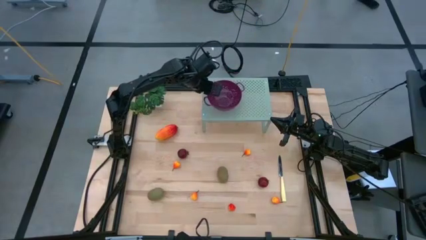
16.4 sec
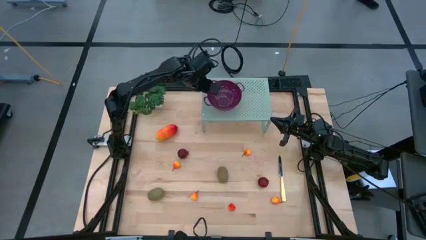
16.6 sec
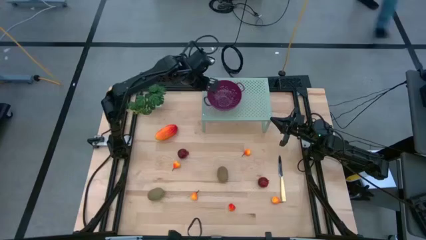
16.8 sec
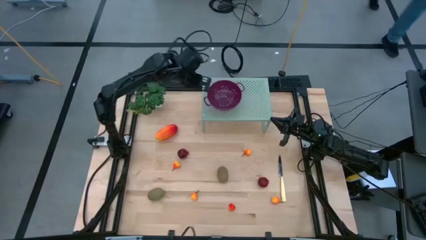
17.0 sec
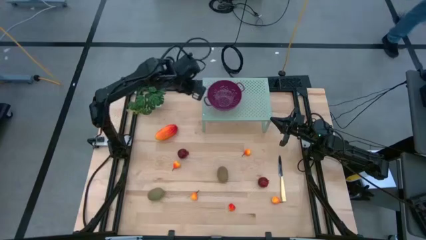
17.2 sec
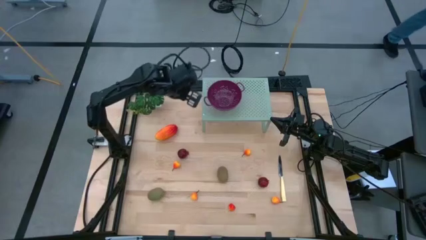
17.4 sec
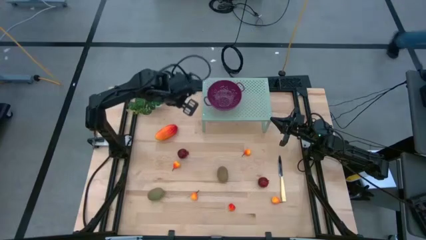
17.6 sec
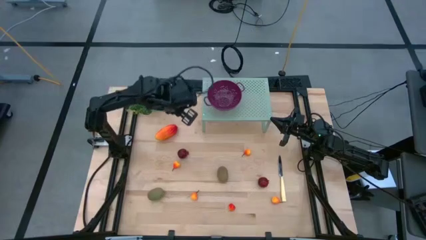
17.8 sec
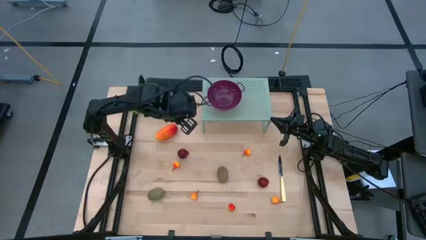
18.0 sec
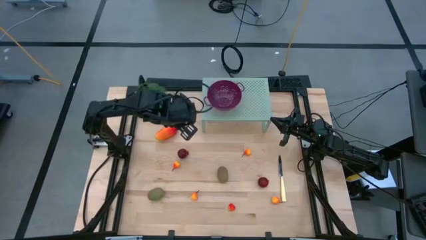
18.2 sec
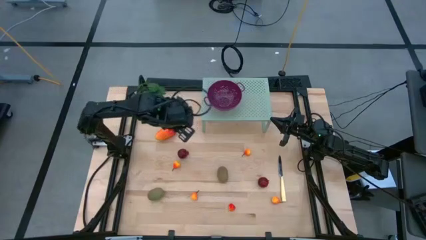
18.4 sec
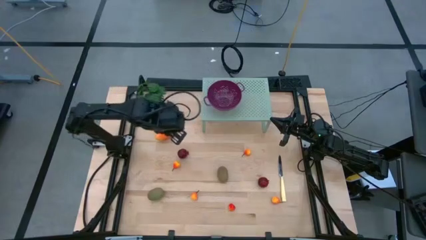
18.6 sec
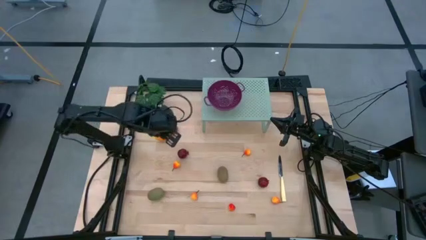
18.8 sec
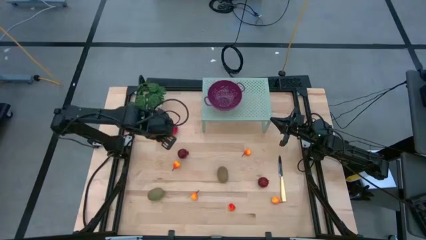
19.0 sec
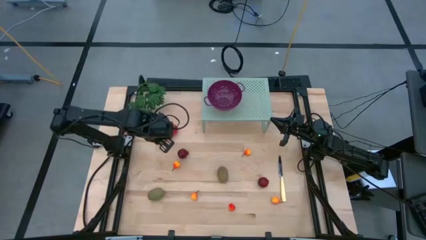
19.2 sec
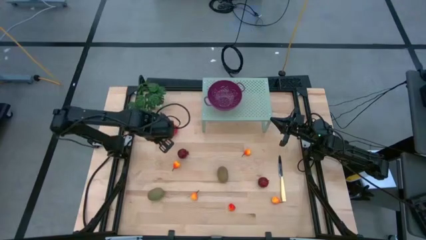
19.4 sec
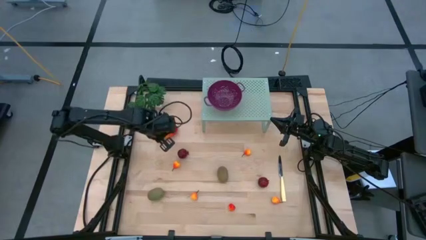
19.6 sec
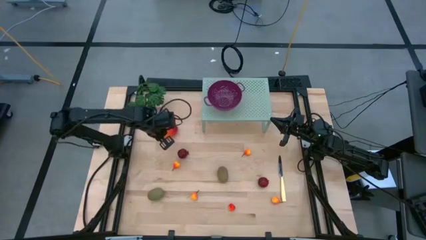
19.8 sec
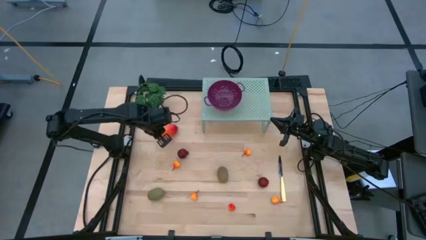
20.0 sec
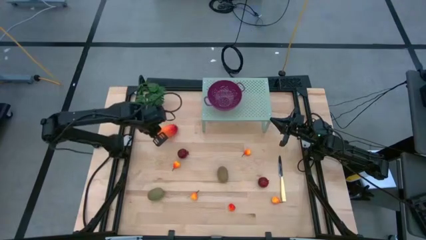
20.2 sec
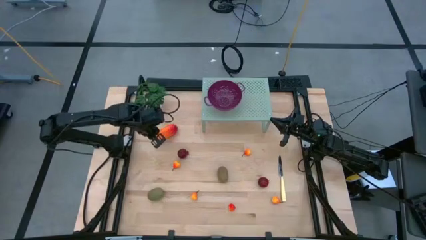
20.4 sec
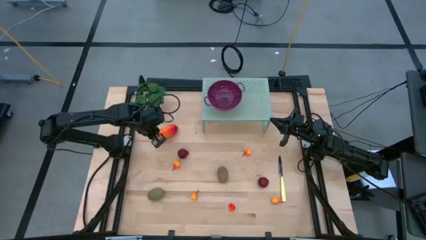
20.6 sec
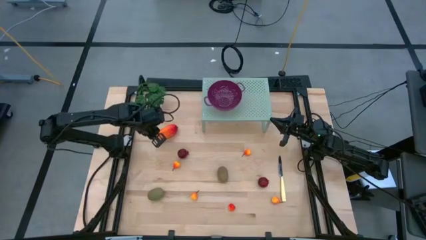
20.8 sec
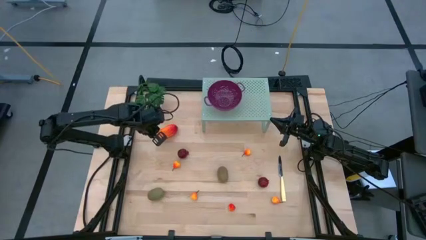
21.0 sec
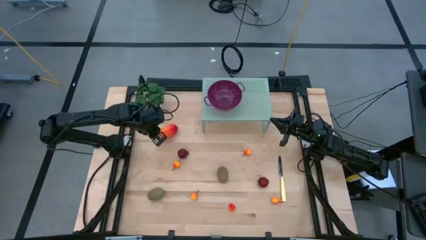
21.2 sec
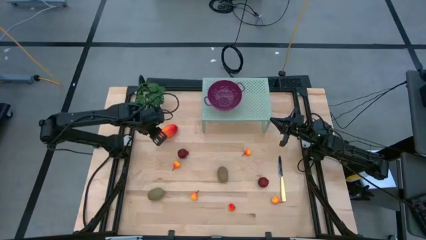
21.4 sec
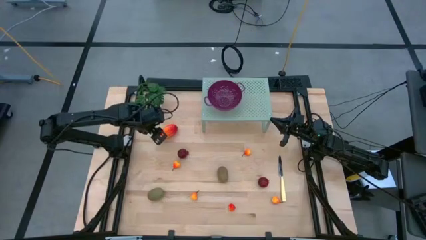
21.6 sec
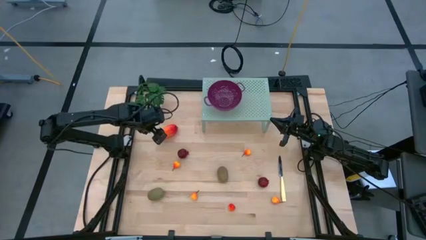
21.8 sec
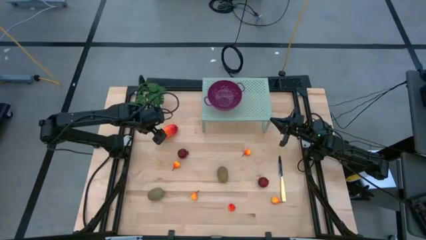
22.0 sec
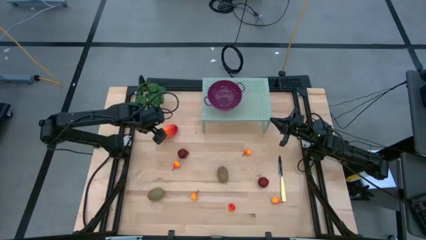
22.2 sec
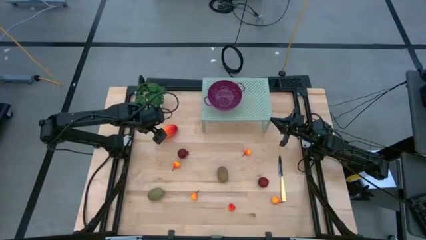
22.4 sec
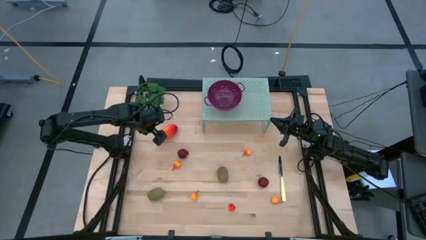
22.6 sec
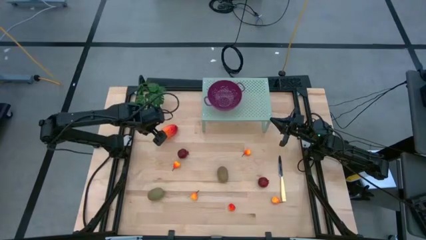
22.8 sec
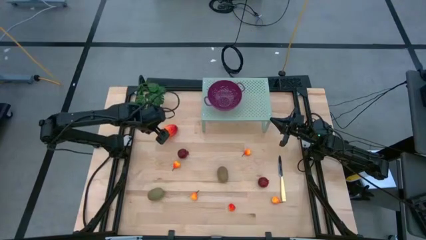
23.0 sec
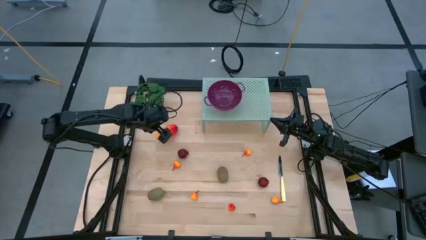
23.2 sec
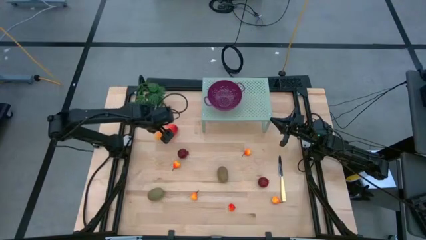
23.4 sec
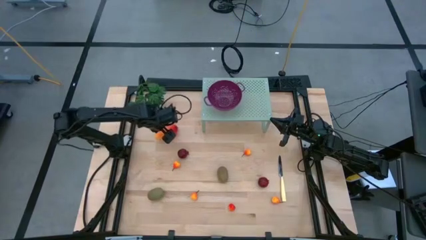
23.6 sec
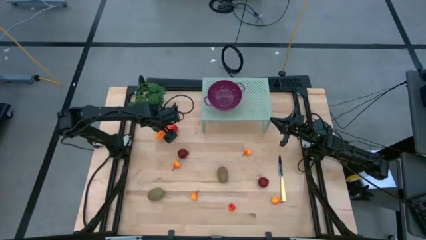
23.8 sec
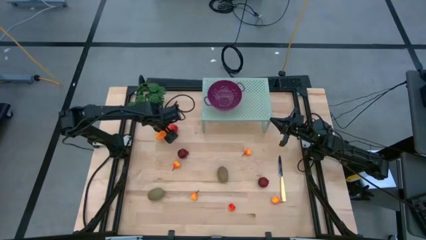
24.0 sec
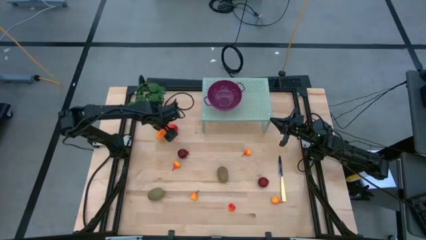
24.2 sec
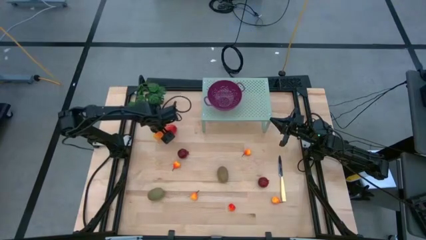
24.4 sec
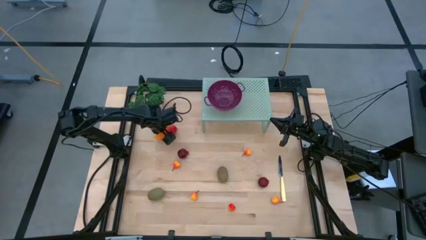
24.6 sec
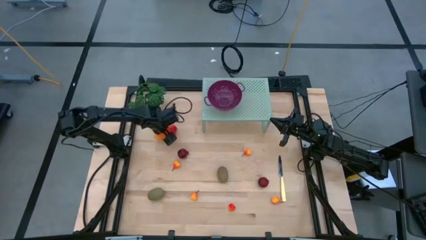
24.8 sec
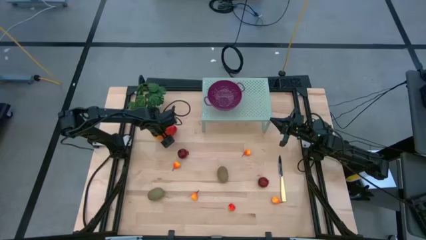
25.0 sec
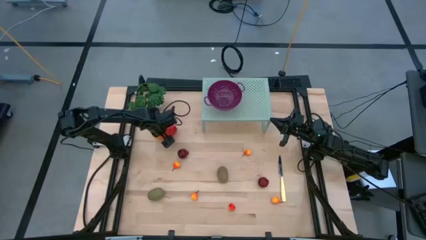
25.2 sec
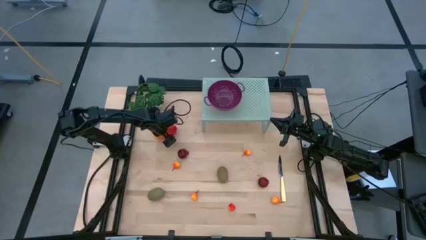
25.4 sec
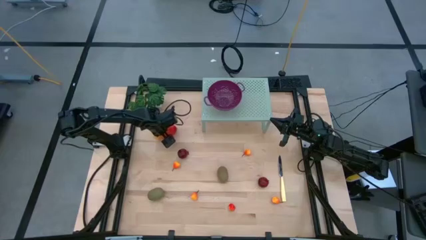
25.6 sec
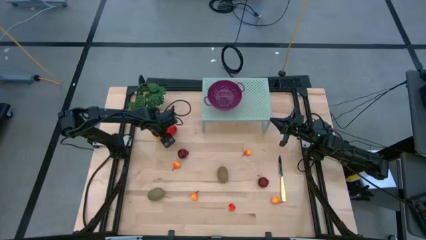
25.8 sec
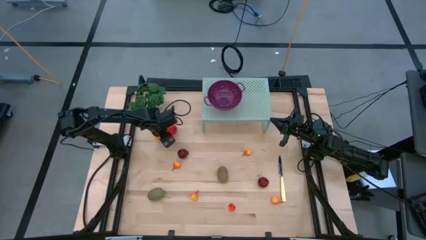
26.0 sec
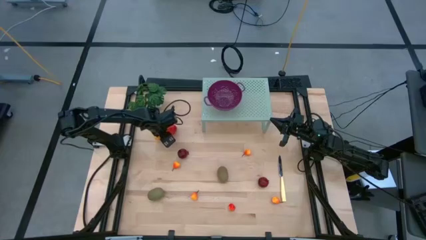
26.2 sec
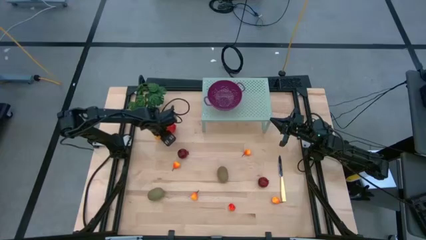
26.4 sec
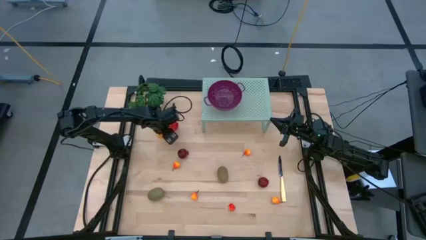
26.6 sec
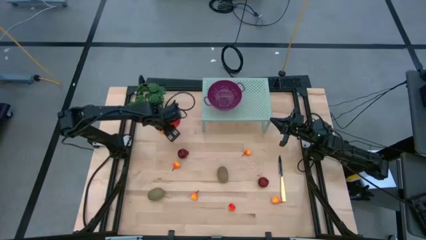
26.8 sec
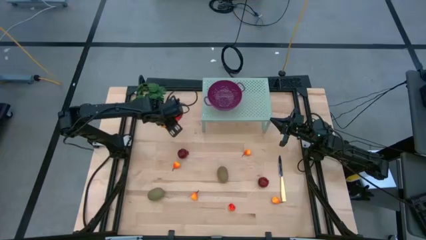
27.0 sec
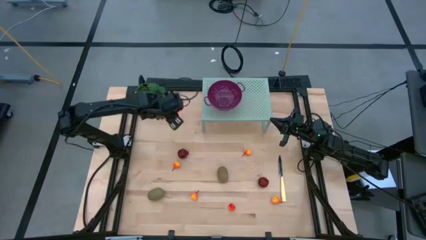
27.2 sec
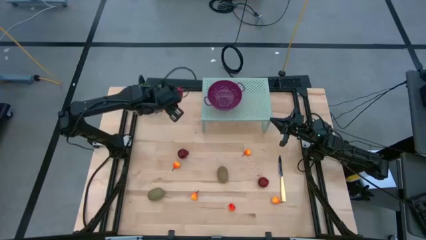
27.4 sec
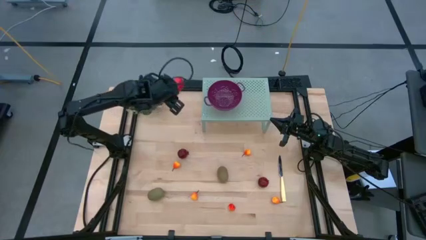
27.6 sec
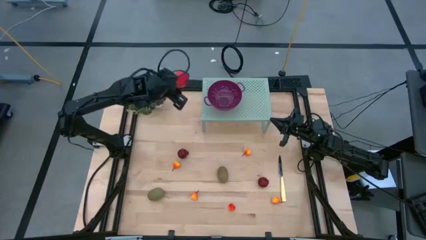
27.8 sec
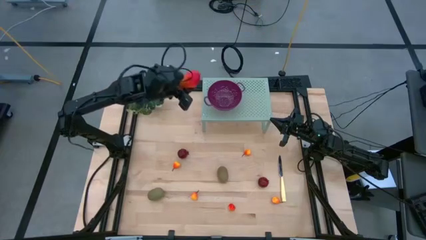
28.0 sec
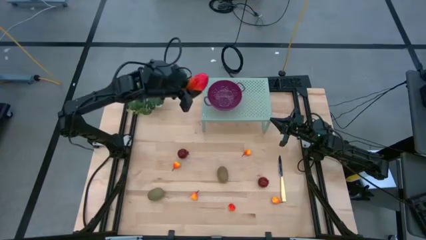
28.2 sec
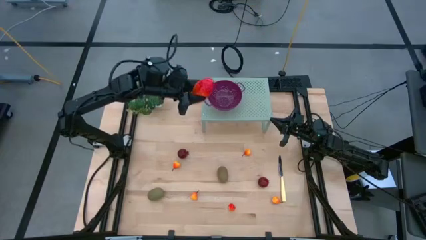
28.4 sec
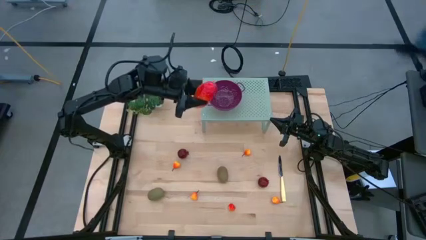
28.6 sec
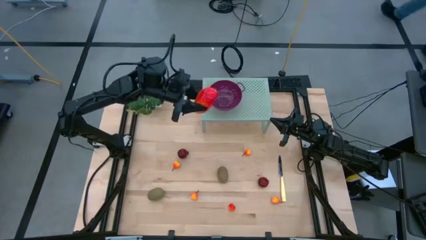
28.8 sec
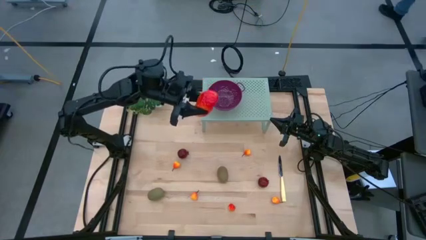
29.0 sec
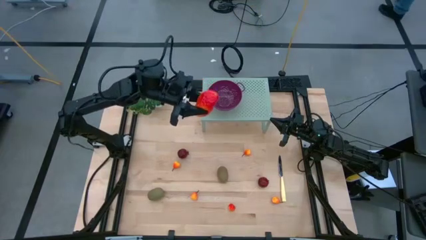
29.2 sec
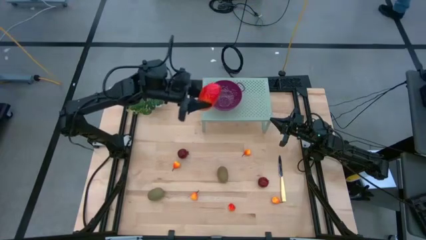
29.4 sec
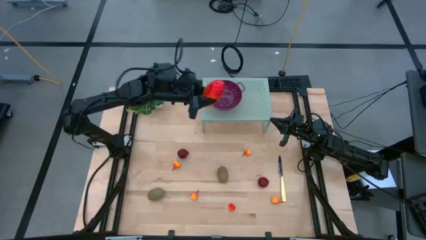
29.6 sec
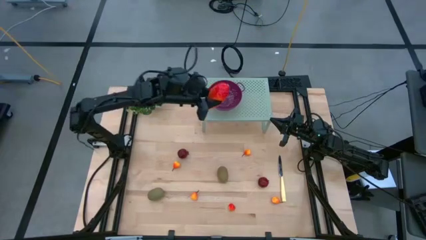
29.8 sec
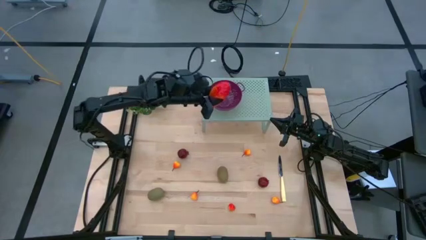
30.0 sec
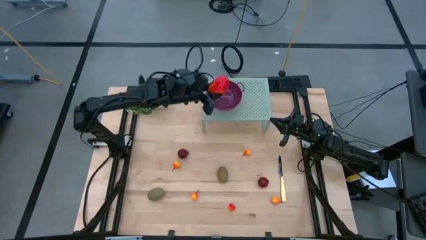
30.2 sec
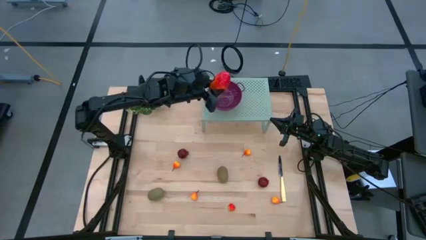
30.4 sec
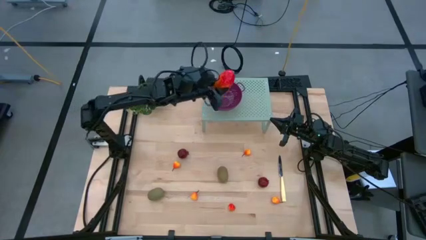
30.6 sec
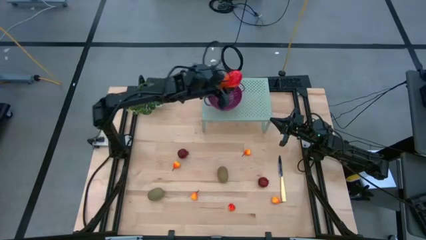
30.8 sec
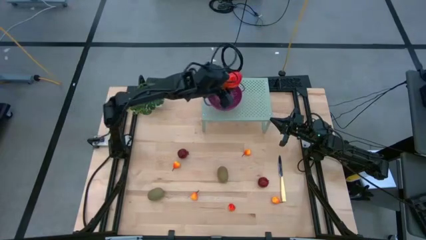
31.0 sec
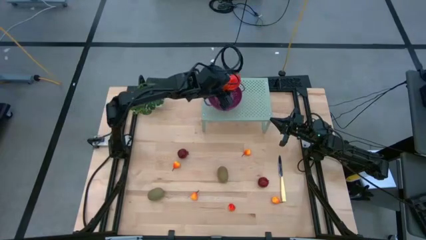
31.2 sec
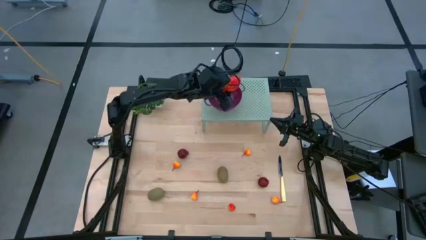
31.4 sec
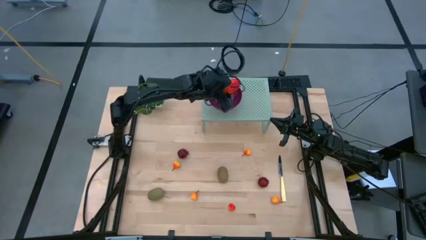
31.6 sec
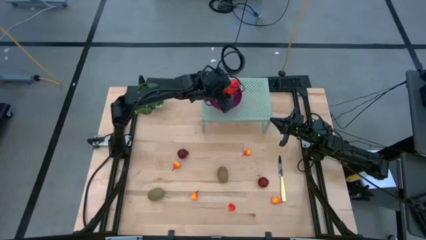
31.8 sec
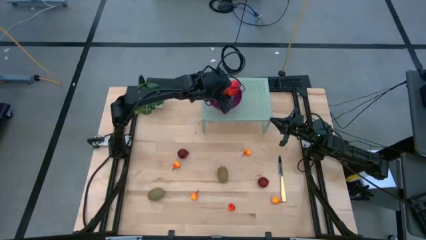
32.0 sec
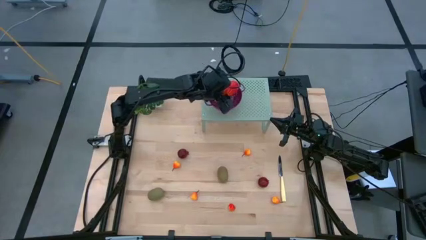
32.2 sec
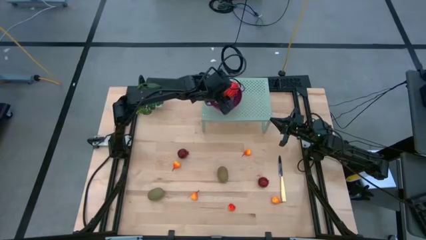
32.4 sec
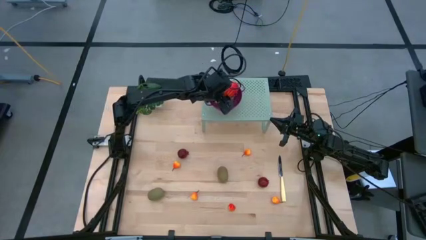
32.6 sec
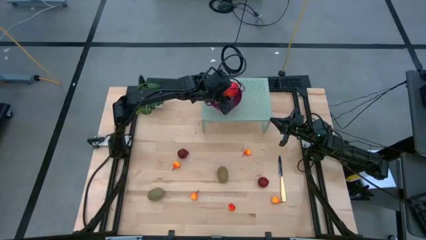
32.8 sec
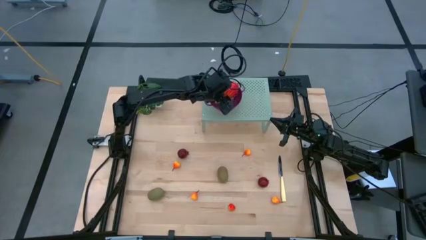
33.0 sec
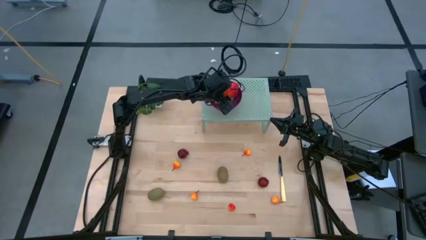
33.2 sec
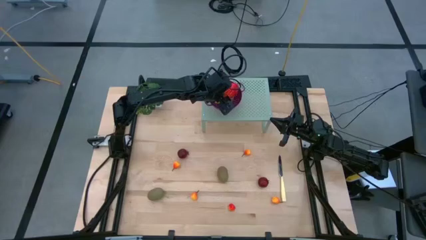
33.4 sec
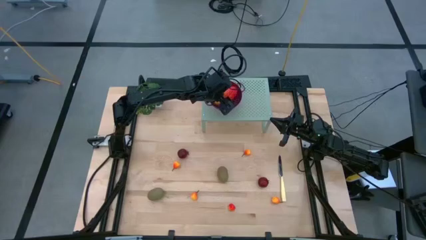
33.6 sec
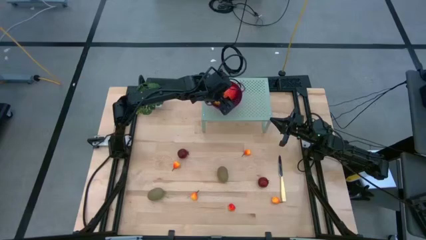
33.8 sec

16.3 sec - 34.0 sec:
Task: Pick & Place Fruit
Put the mango in the violet strainer bowl on the shelf
